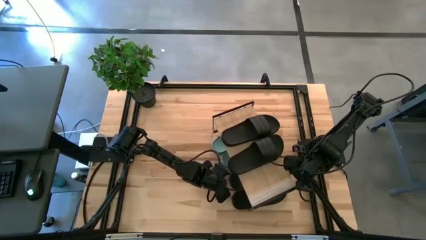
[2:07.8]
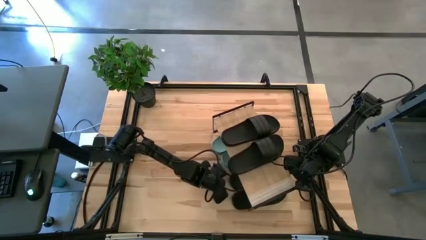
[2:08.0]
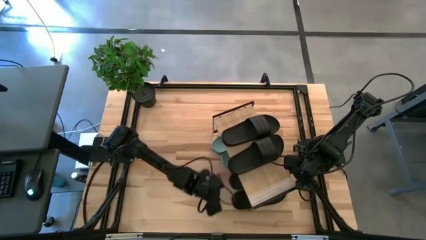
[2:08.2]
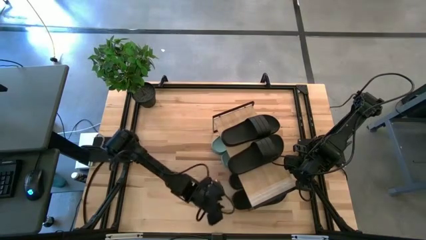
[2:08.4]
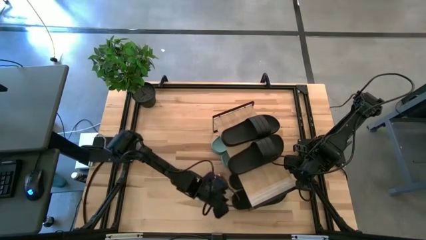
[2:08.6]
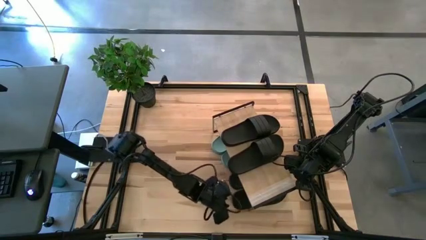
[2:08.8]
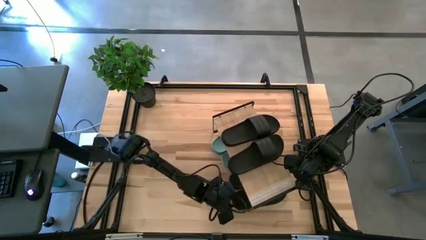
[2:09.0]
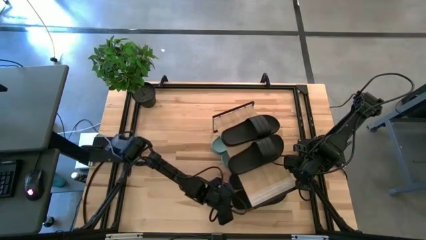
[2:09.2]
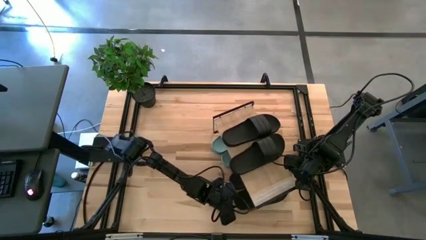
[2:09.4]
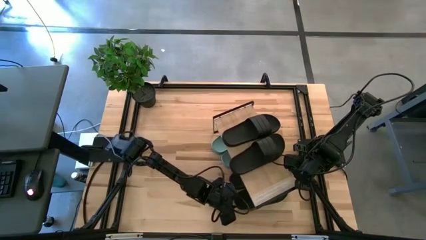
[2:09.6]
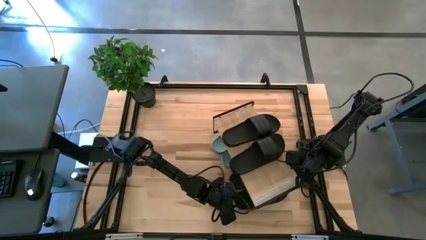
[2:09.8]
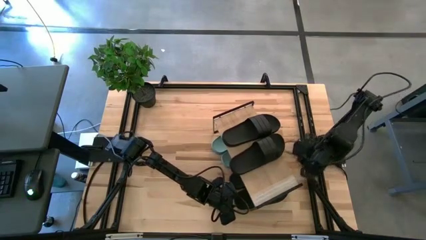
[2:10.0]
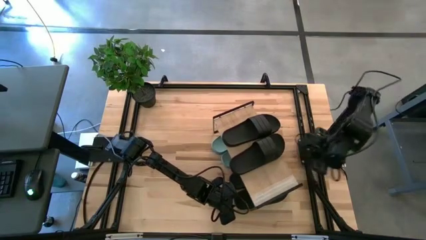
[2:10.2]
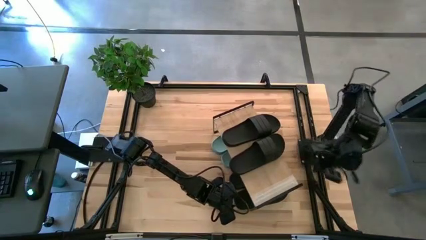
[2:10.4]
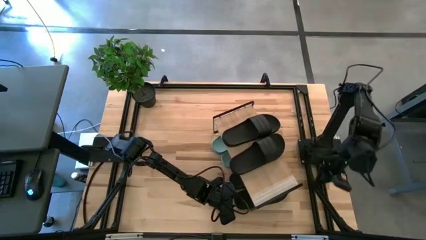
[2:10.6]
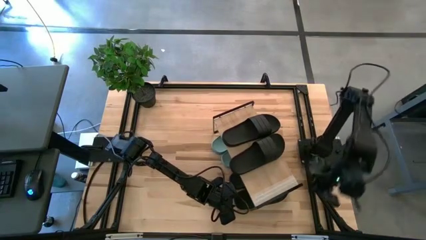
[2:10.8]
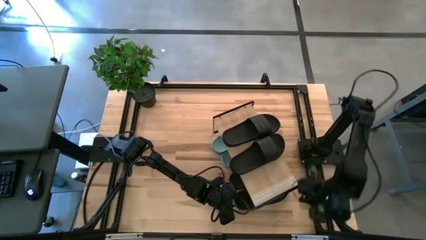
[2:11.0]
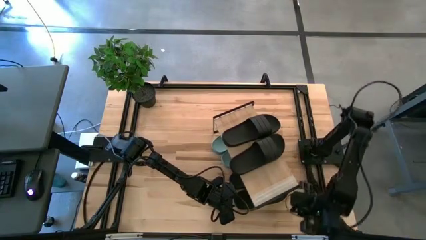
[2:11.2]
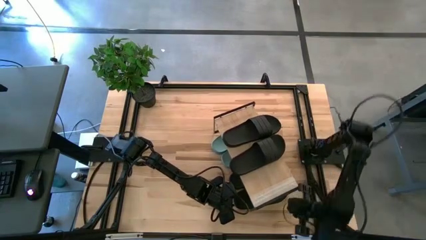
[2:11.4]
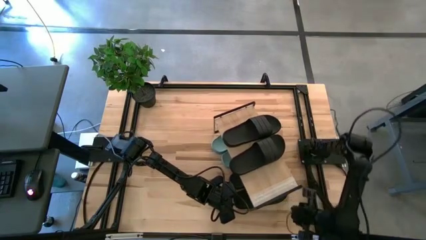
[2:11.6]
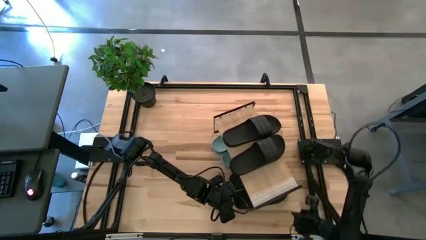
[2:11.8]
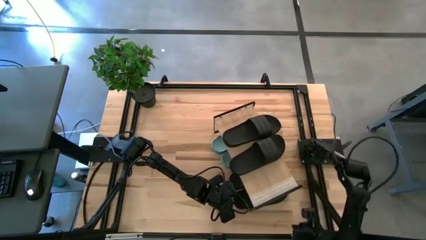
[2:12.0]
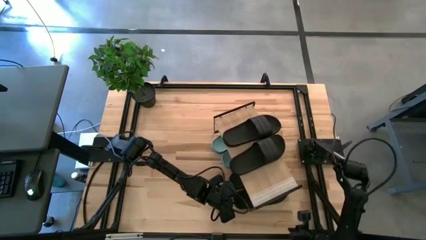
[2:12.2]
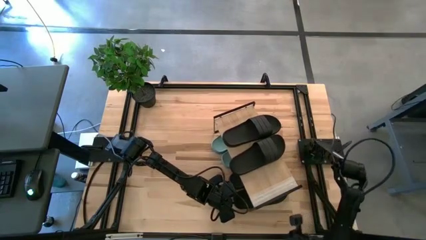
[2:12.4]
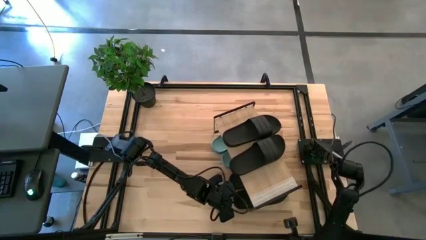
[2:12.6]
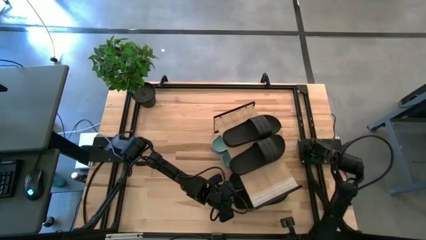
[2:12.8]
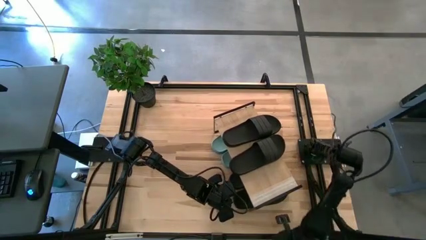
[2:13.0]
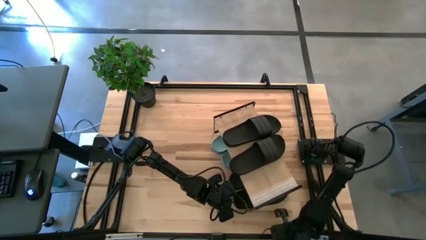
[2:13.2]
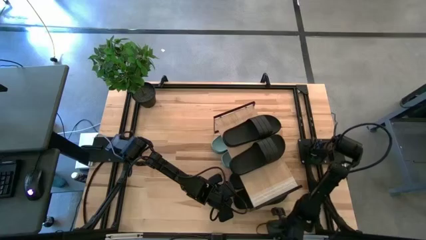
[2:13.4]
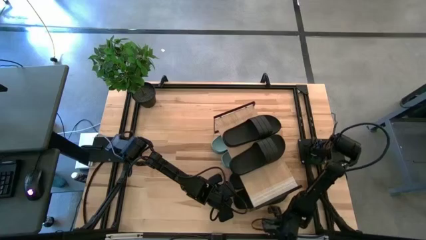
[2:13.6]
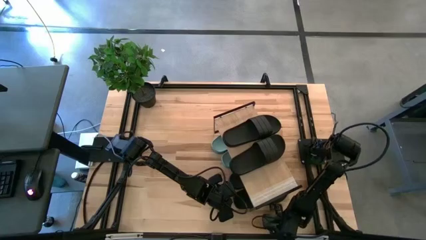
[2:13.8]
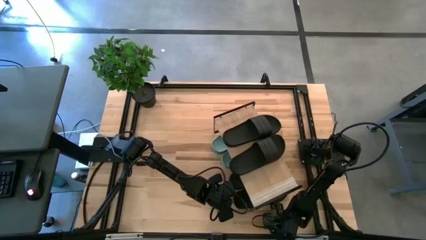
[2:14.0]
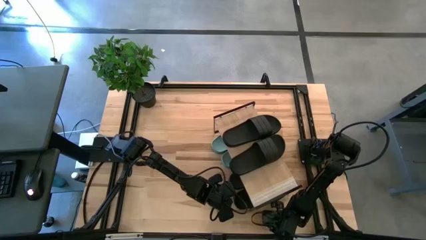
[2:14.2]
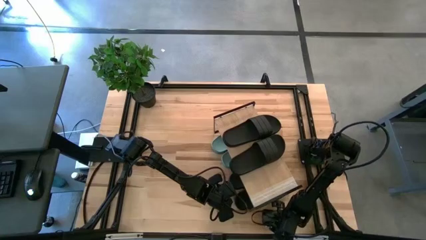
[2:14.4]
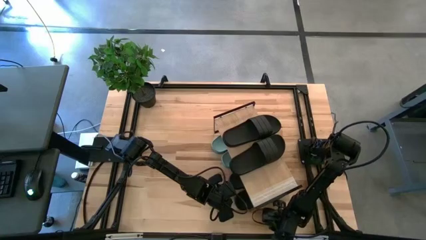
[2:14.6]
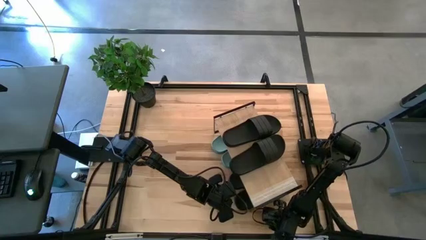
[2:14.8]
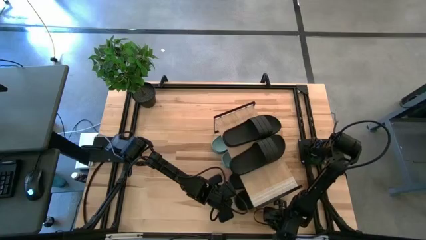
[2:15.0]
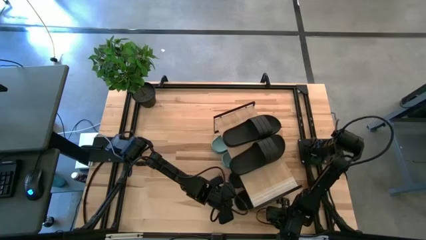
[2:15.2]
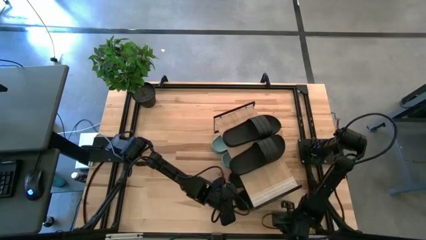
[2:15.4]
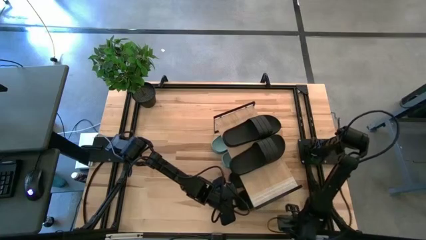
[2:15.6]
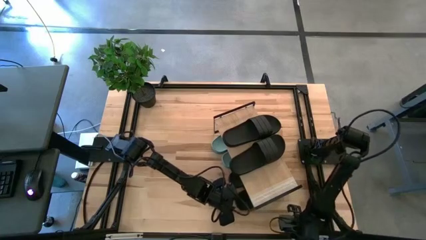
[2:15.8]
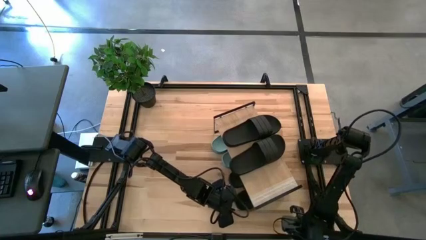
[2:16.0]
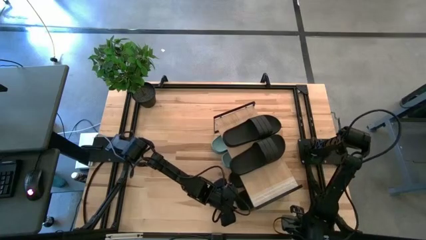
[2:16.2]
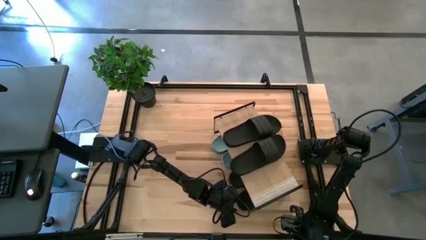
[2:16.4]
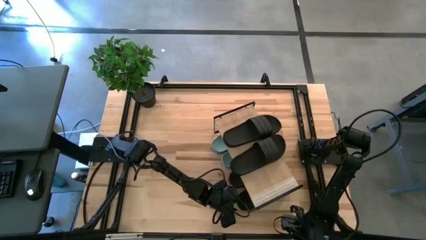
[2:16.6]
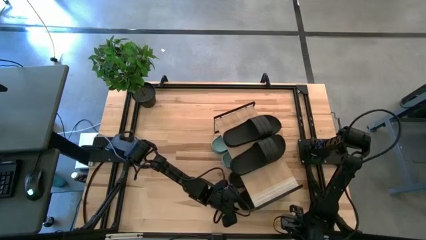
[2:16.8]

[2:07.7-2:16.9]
Task: Pick and place slides into the shelf
Adjust the black slides under the shelf

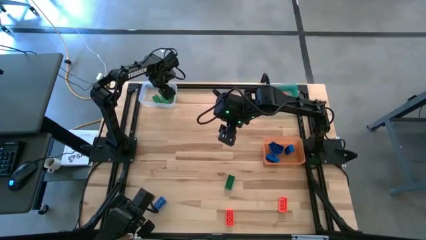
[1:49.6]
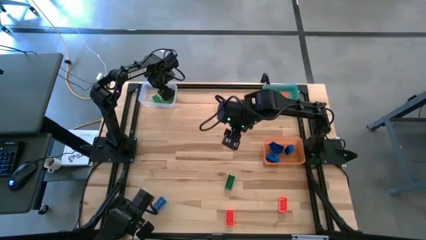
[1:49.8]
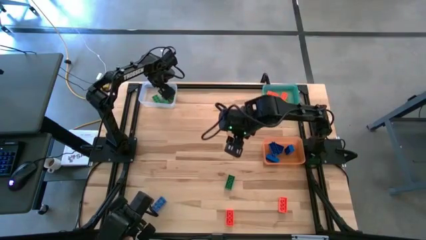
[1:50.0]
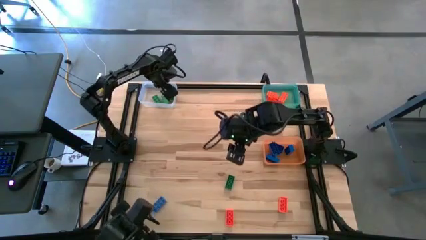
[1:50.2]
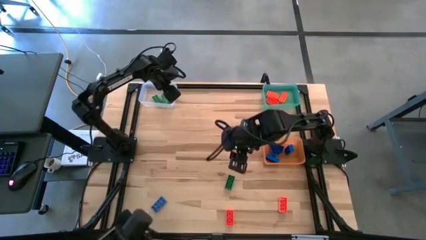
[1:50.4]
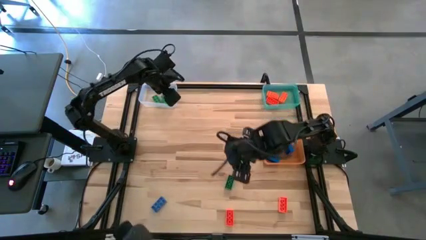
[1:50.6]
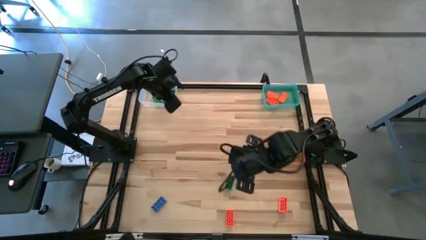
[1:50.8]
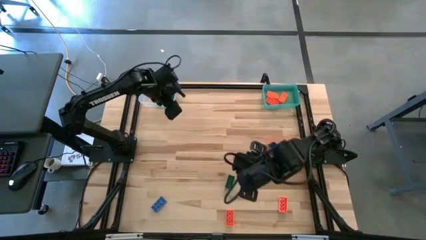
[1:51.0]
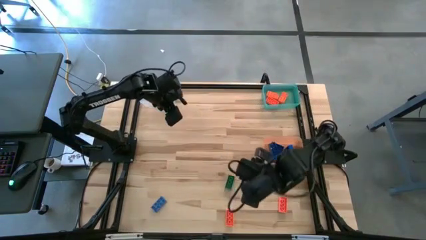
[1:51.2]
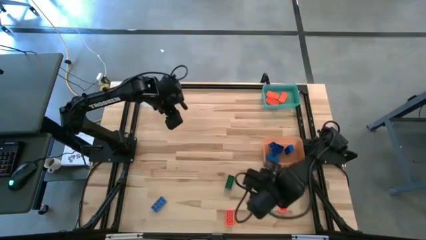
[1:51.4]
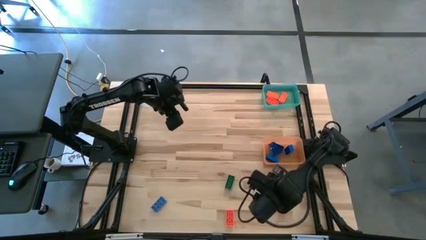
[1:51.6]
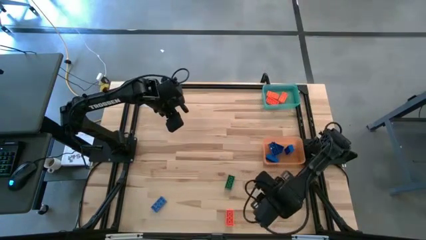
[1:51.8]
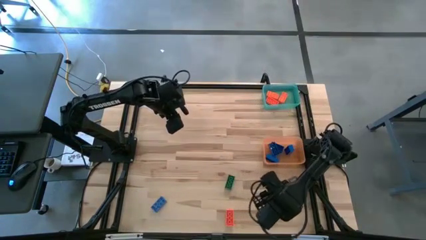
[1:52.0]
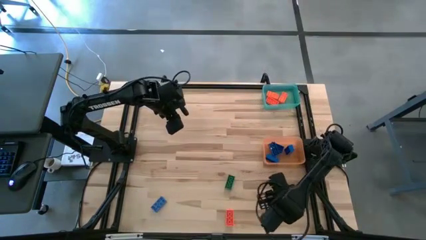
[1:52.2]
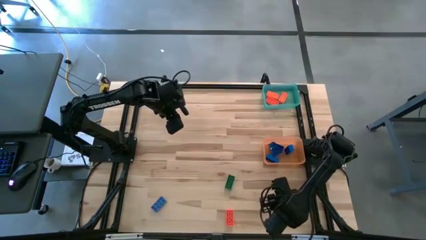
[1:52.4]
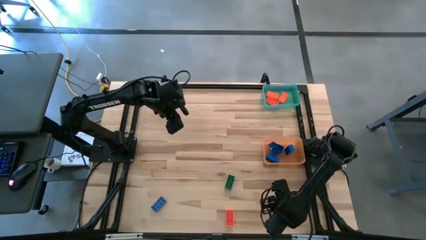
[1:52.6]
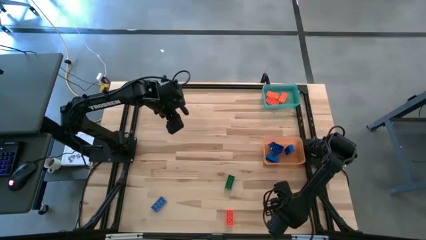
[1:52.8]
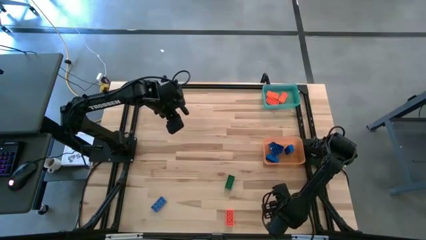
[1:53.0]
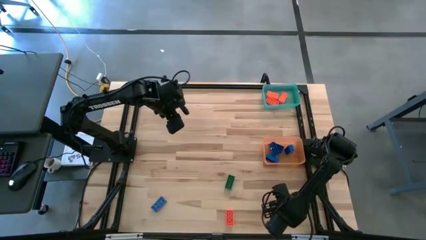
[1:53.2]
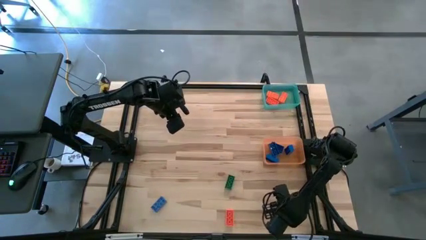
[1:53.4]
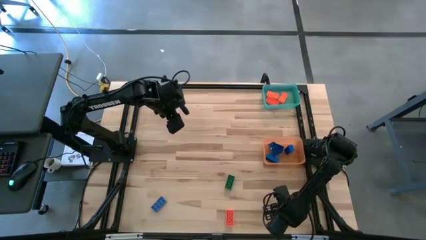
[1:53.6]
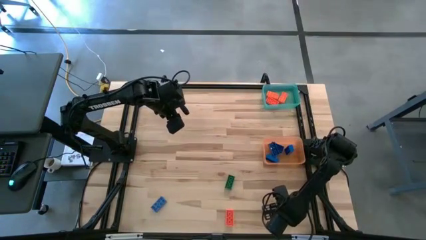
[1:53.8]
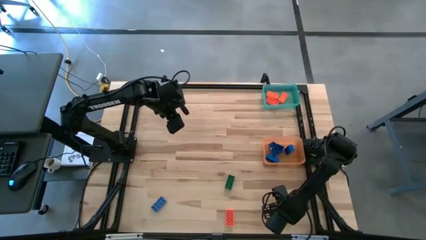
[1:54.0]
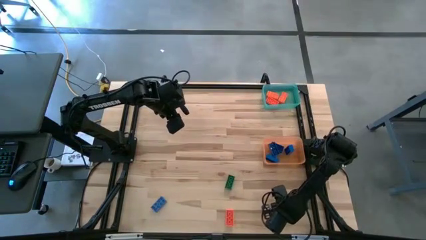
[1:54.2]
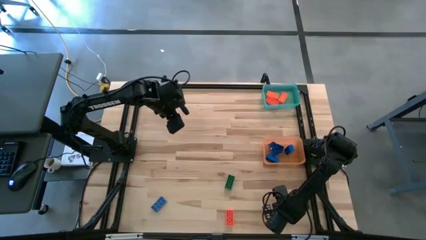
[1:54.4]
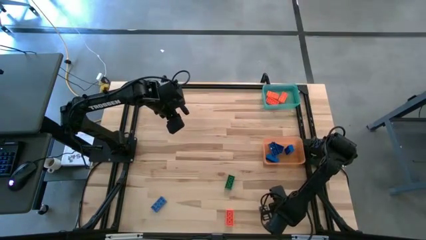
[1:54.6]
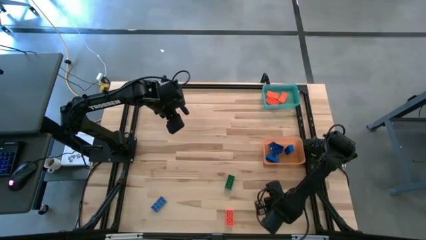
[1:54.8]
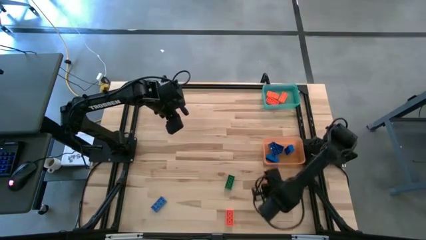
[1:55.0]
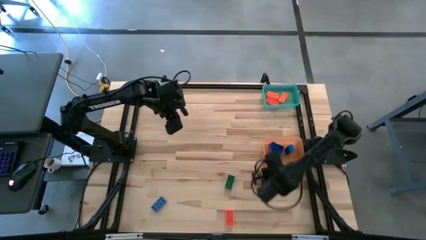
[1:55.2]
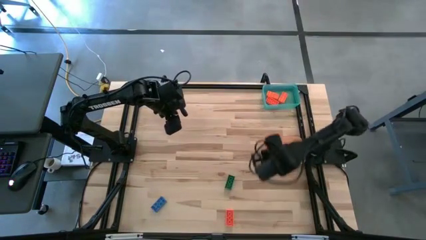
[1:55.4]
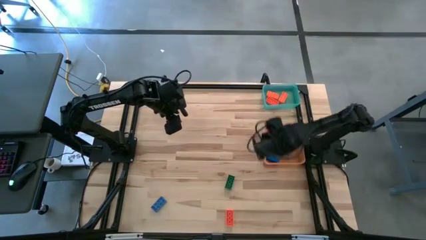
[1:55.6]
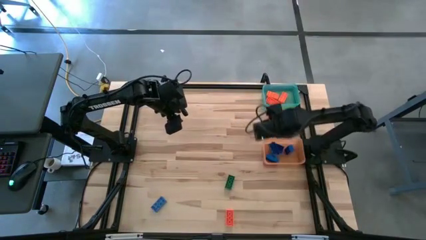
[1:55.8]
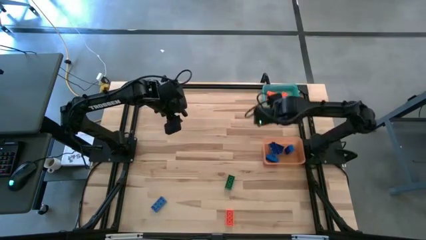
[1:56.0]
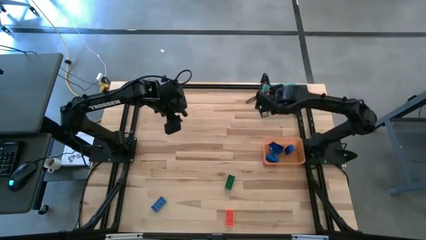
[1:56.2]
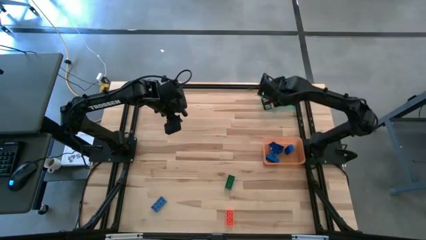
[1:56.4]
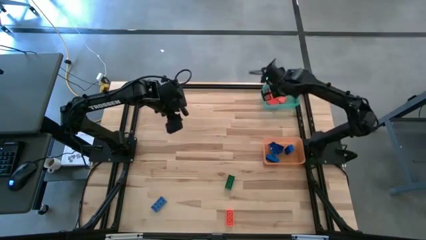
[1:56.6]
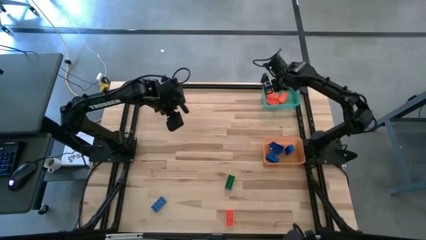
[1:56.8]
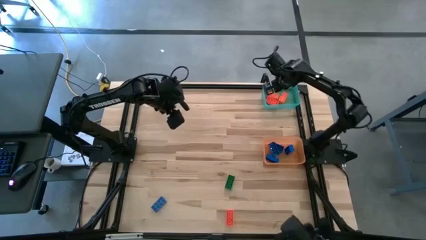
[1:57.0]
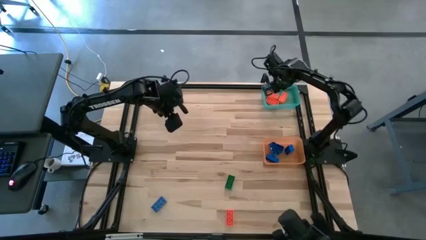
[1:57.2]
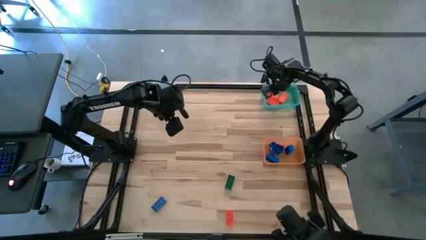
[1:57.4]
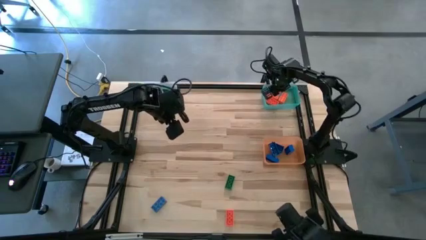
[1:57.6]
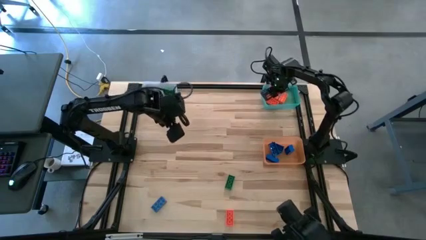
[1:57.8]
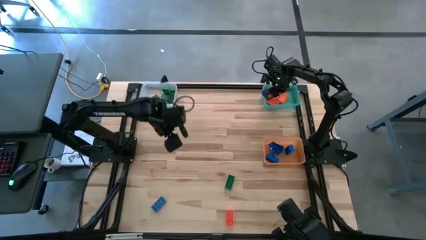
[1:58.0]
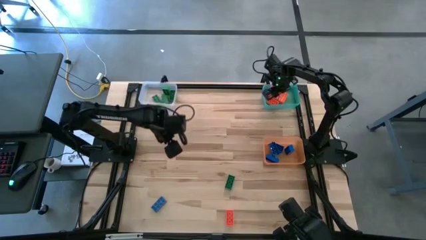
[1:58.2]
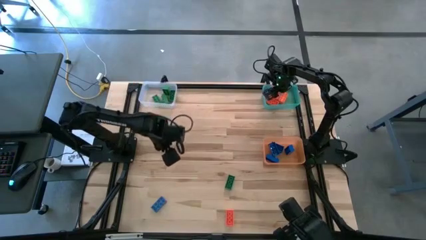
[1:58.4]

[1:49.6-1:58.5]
Task: Sort & place blocks by color
Put the orange game piece into the blue bin
